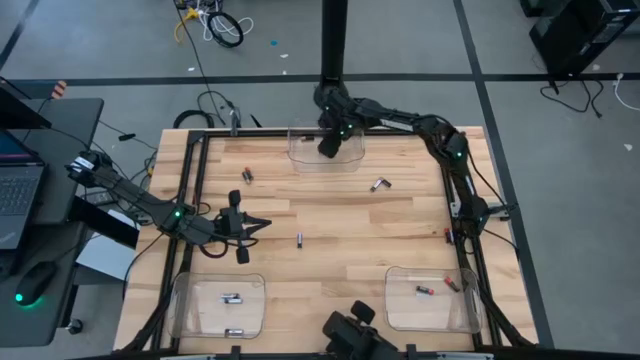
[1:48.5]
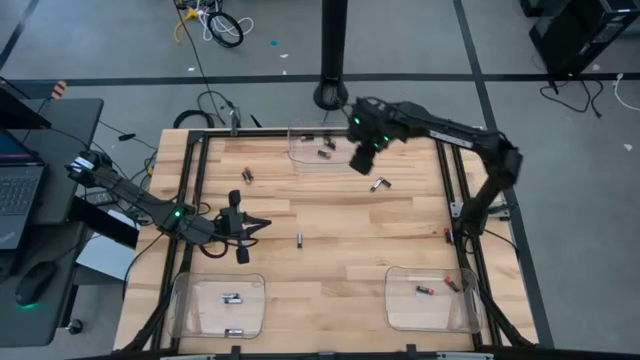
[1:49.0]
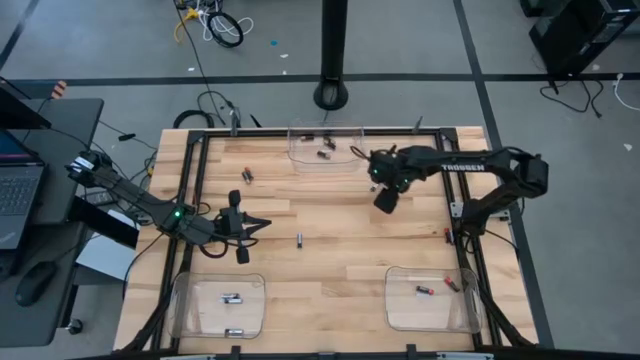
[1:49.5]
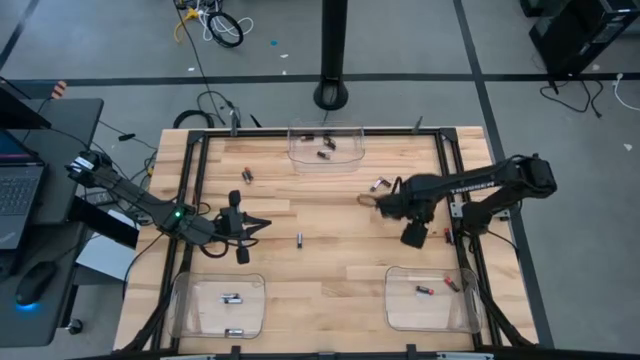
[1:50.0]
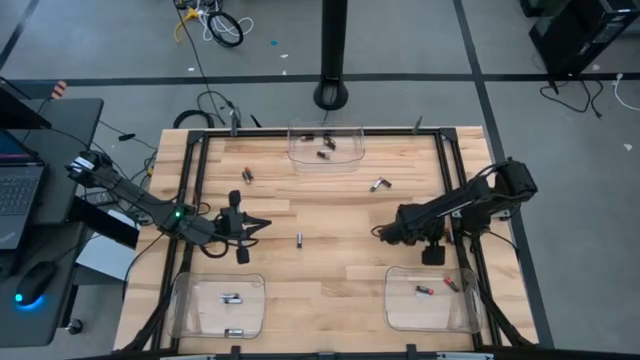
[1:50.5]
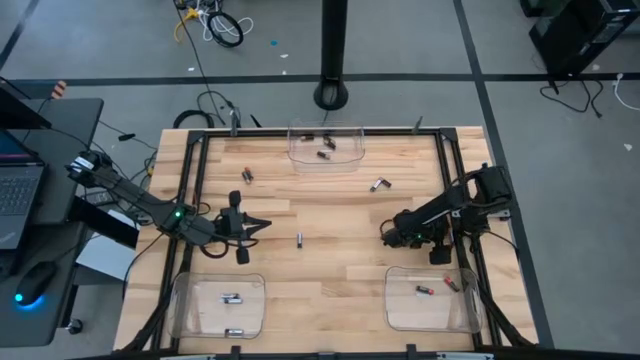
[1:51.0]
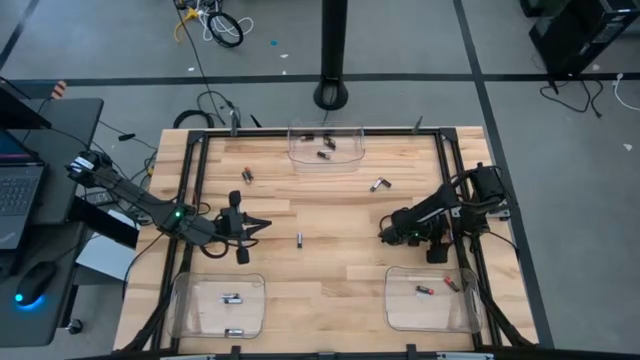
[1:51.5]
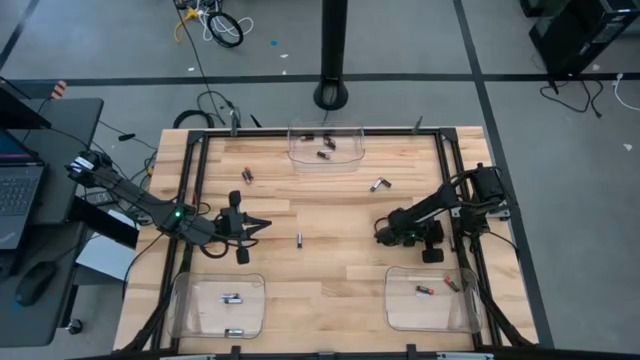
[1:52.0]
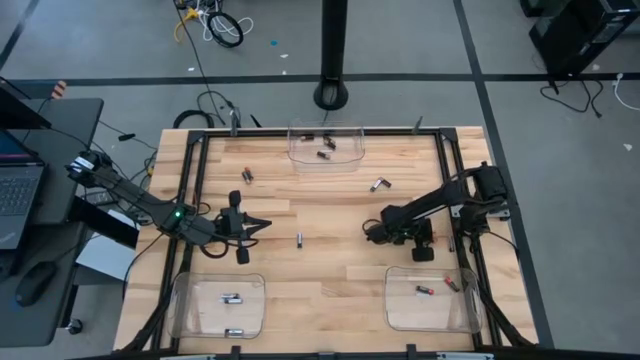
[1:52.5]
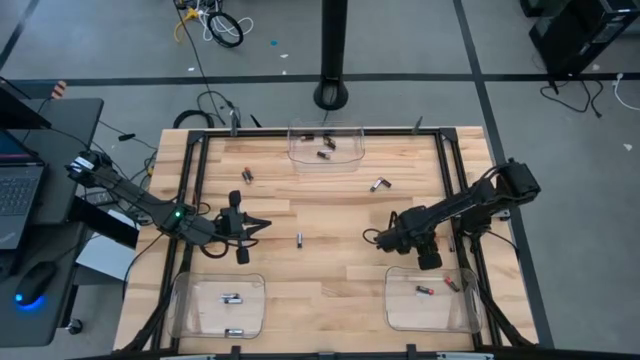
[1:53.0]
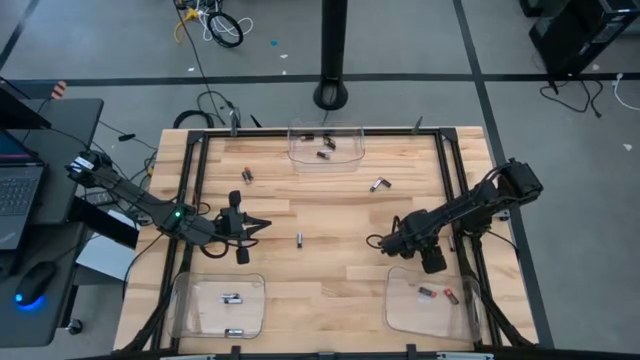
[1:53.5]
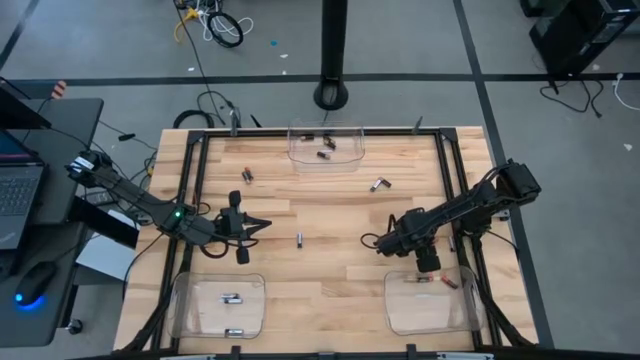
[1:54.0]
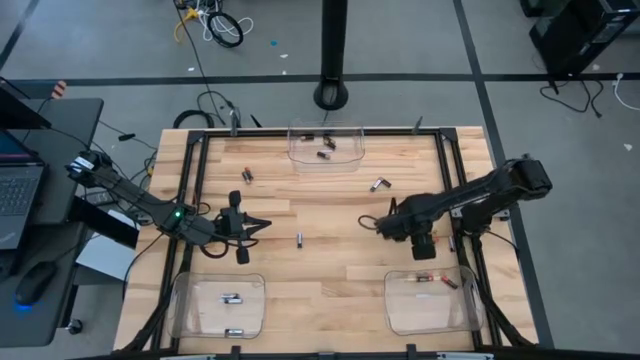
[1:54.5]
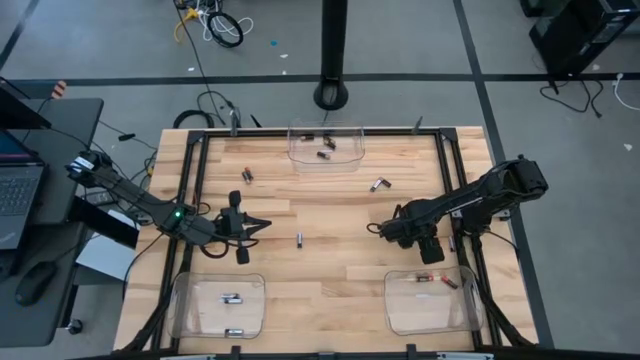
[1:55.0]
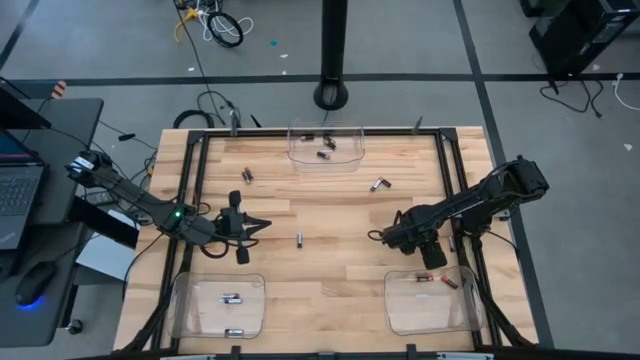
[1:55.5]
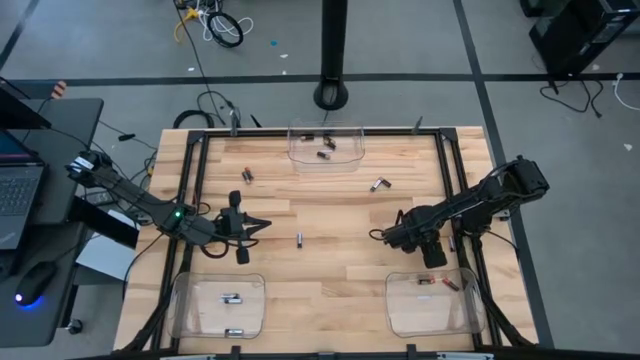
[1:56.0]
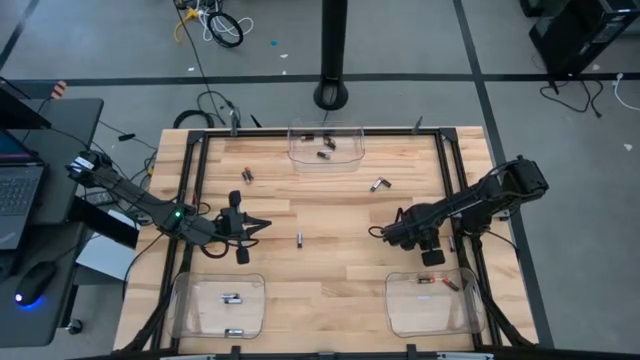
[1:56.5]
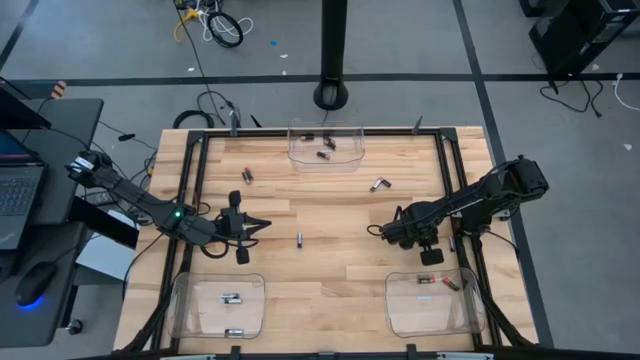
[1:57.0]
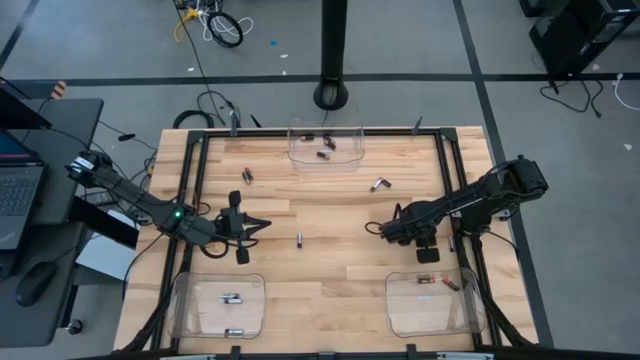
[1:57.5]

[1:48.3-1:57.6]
Task: Sort batteries
Put the brown battery into the bottom right transparent bin

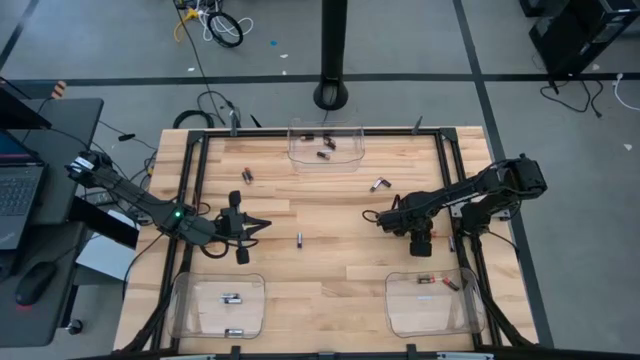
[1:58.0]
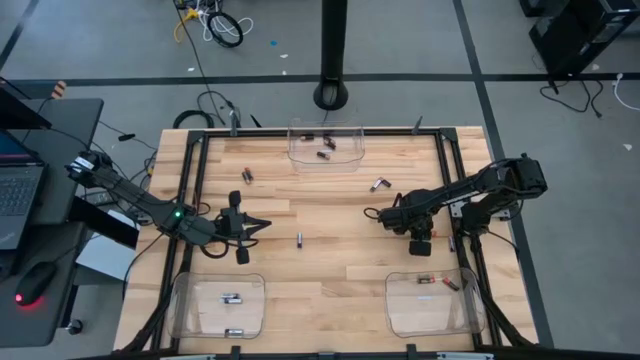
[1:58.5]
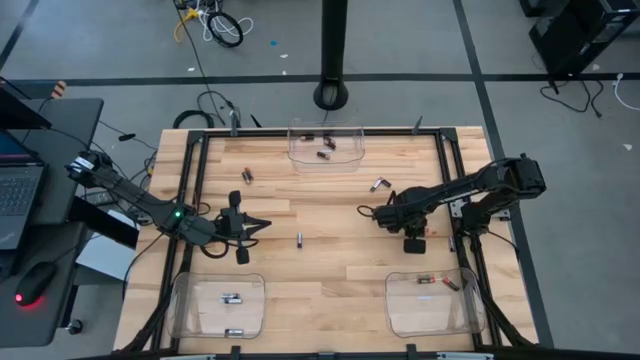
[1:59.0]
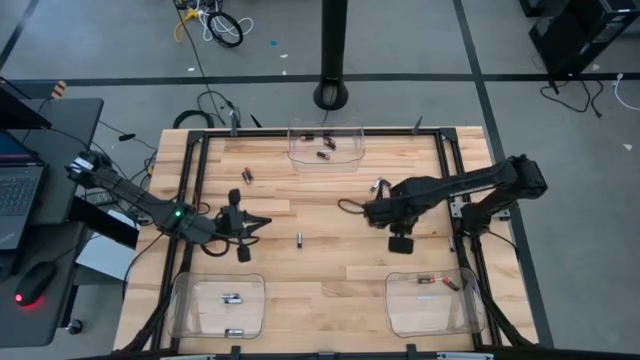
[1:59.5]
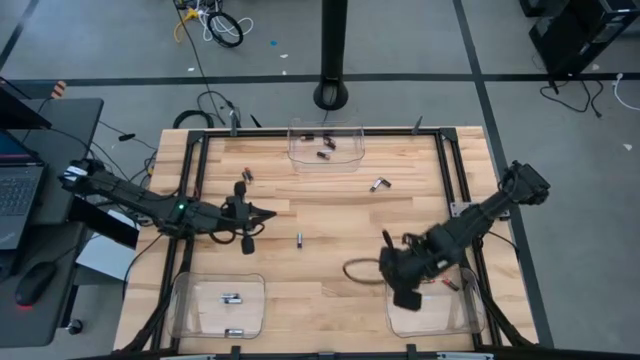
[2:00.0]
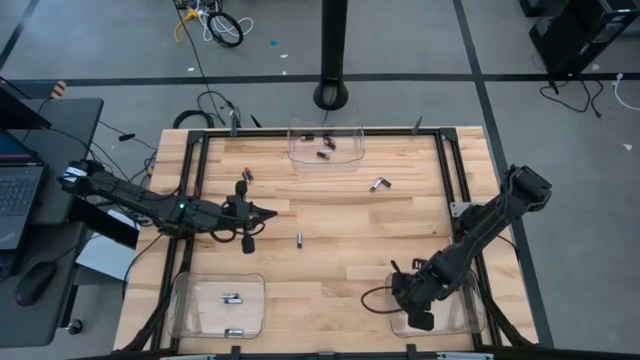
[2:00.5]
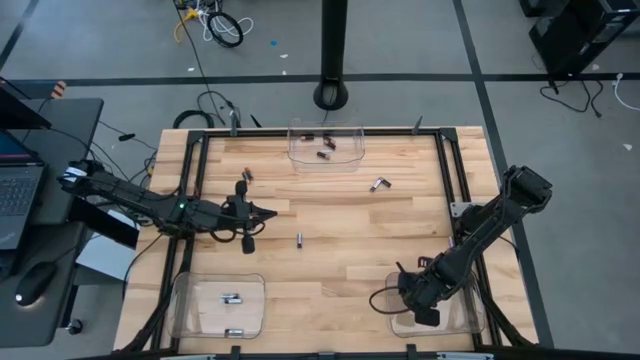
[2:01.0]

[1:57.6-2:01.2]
Put the red battery into the bottom right transparent bin

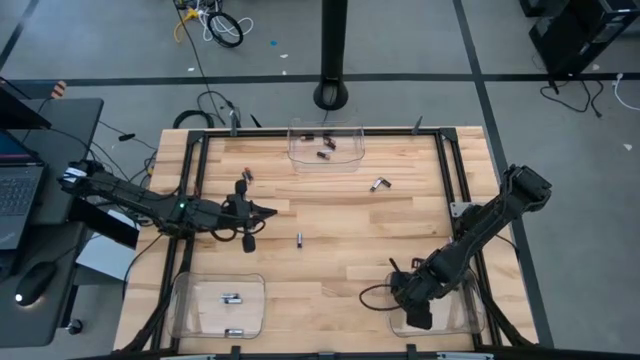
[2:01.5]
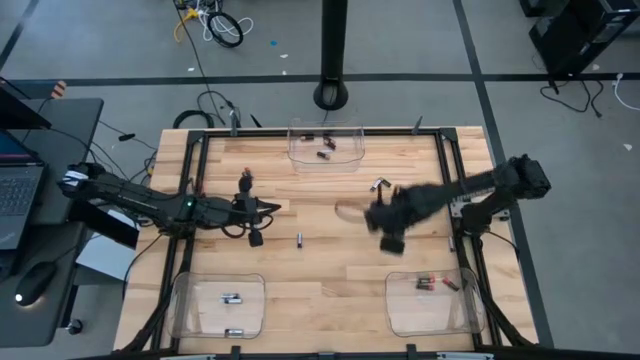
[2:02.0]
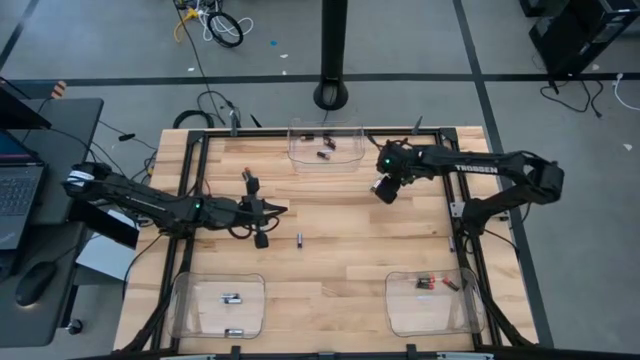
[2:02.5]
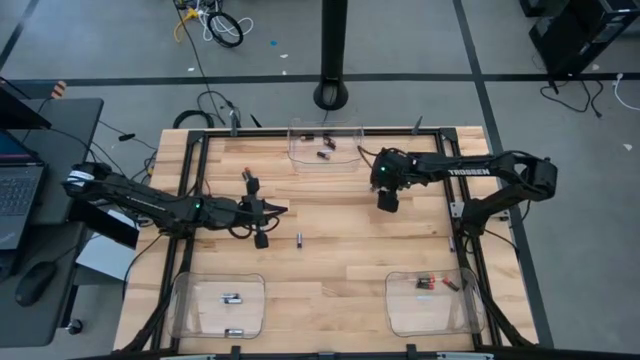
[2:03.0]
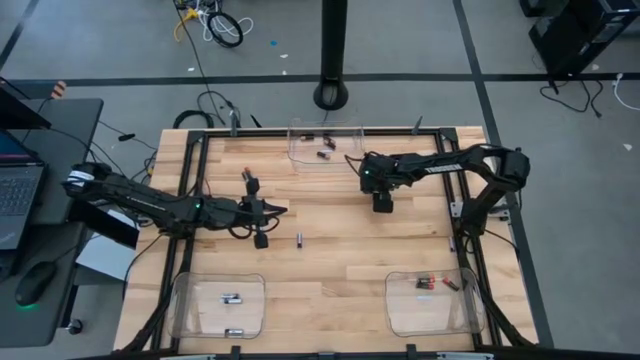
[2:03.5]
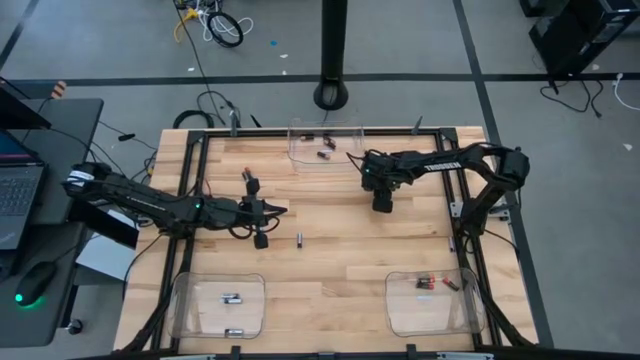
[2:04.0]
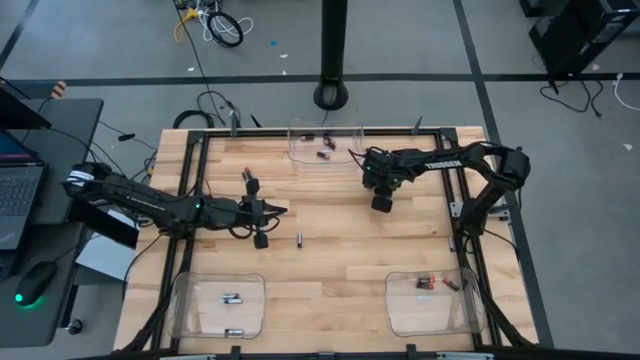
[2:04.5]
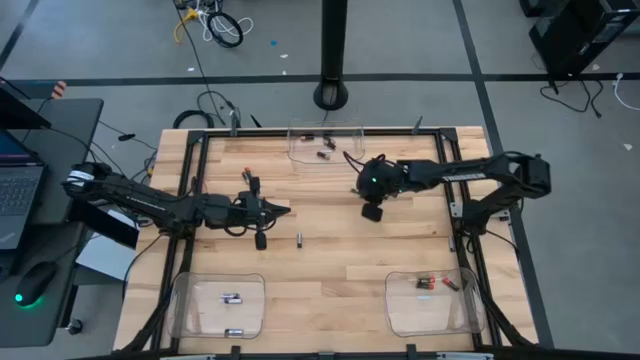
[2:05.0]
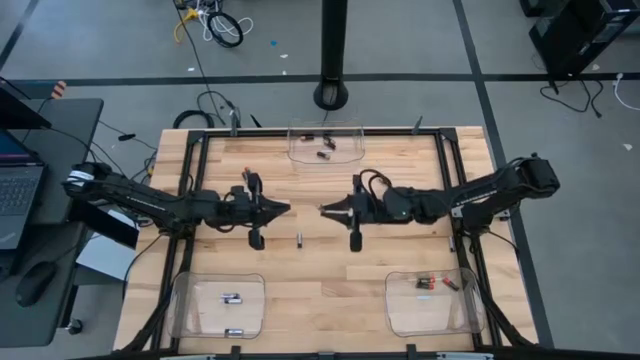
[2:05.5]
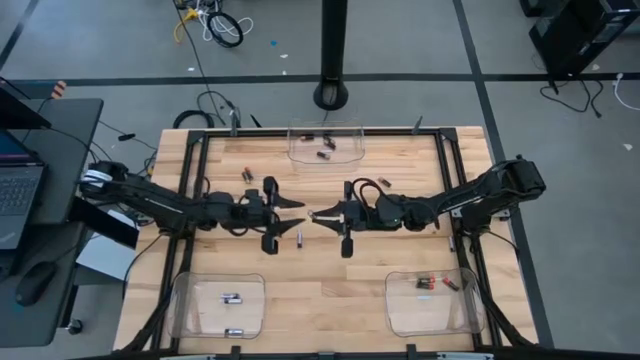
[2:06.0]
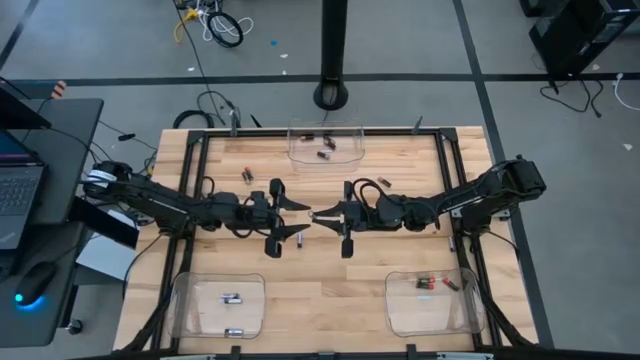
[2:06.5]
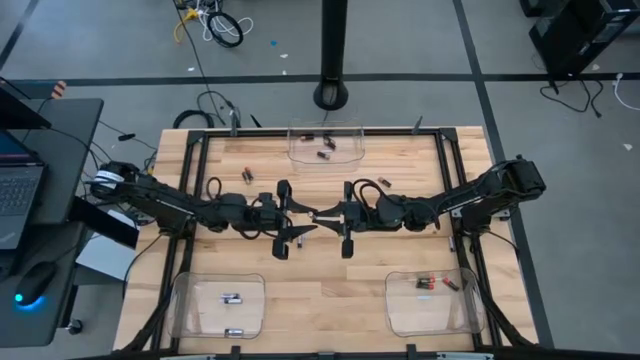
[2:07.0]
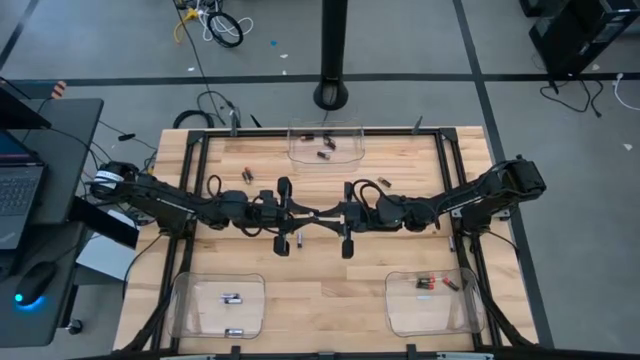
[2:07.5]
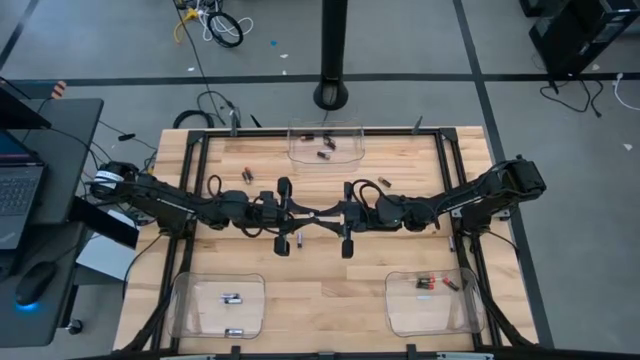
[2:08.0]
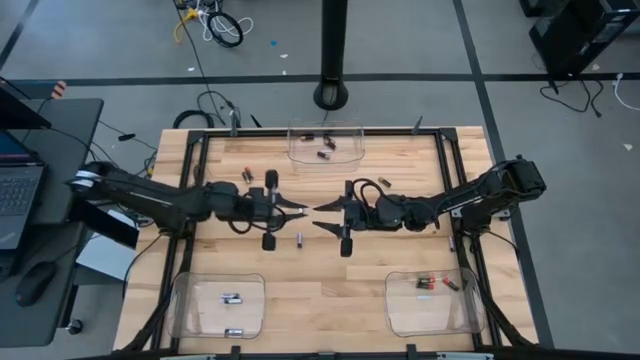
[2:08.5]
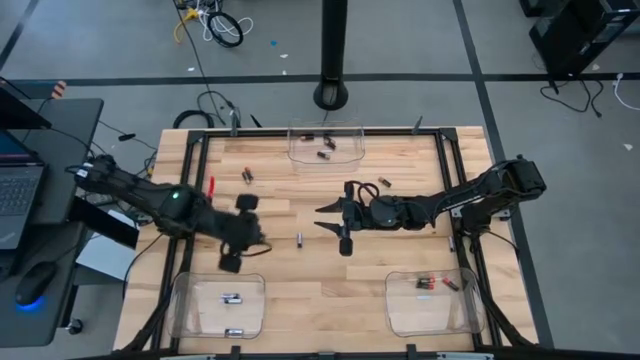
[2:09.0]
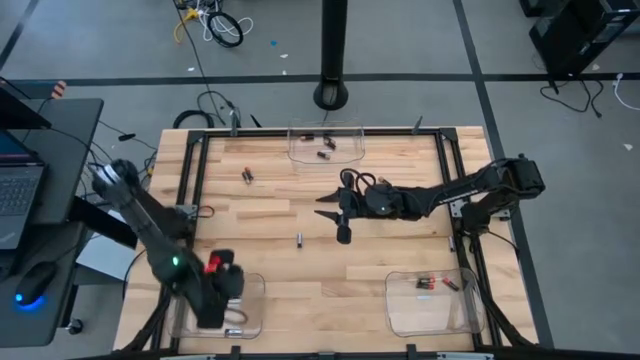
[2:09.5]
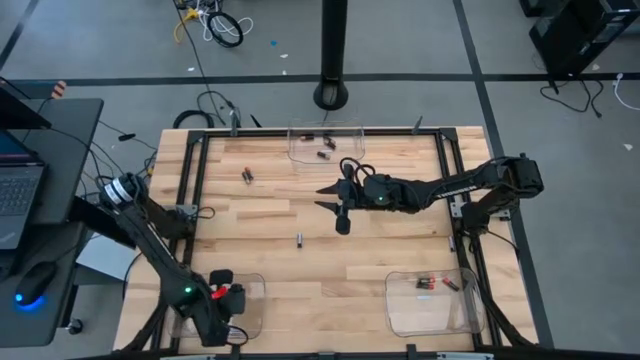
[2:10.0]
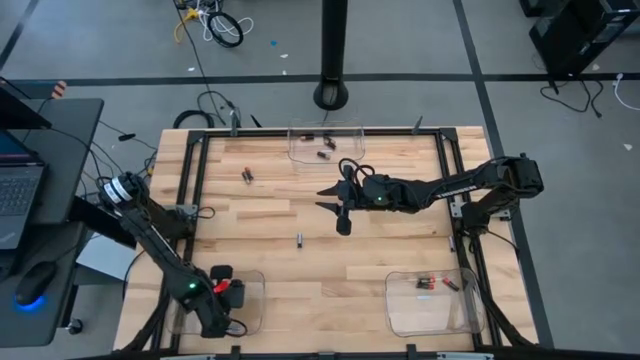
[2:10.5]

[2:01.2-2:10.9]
Put the silver battery into the bottom left transparent bin
